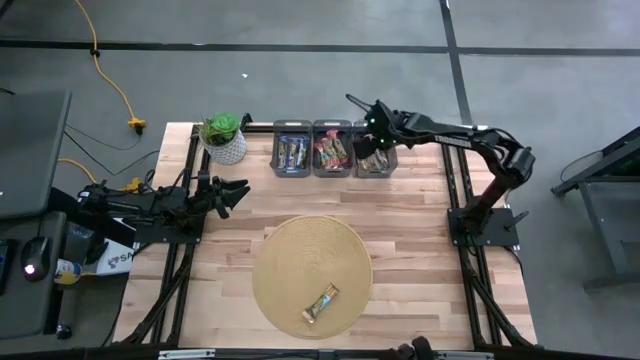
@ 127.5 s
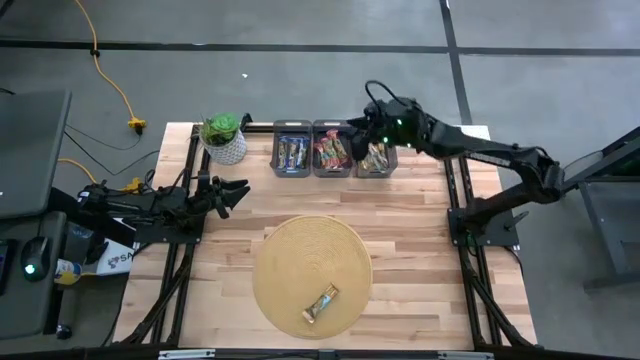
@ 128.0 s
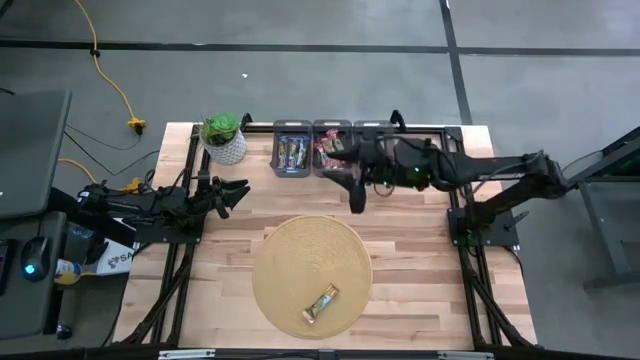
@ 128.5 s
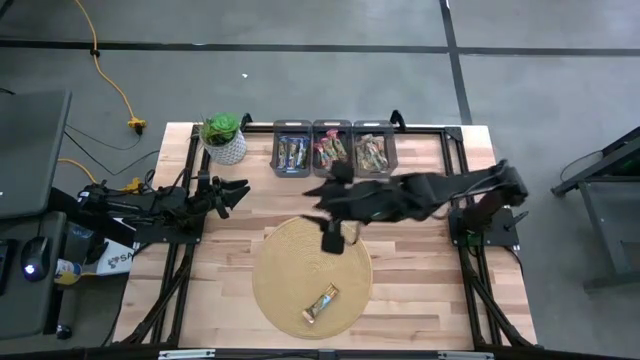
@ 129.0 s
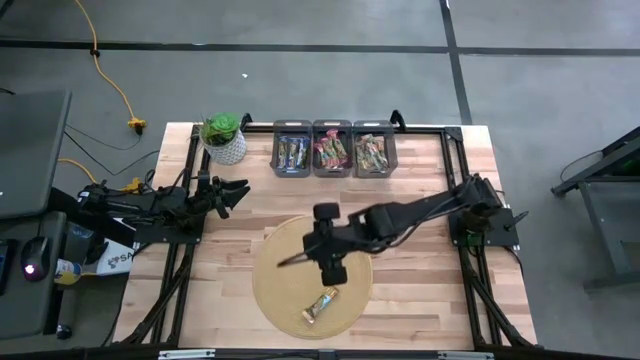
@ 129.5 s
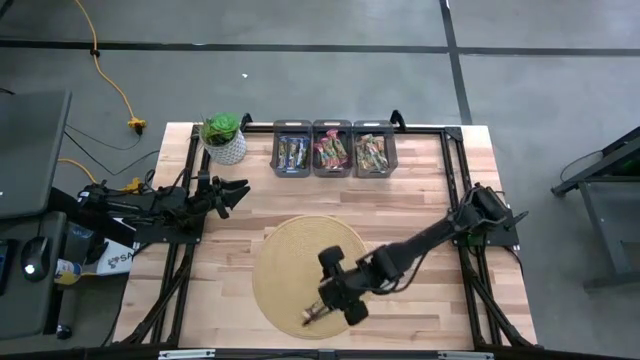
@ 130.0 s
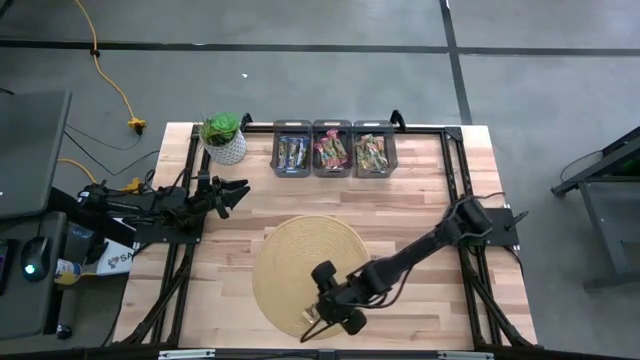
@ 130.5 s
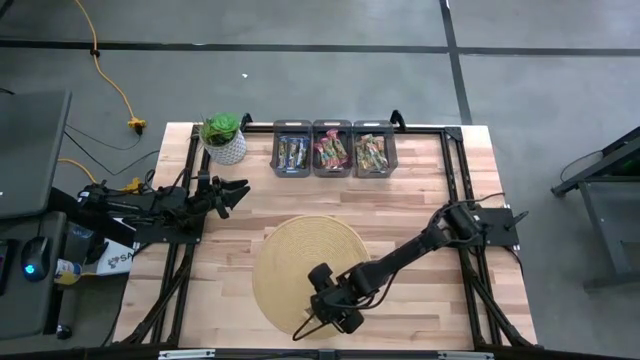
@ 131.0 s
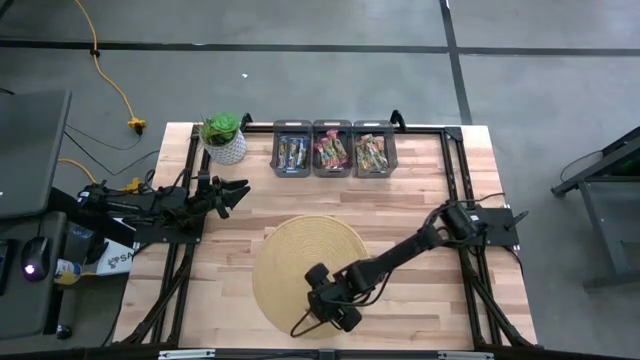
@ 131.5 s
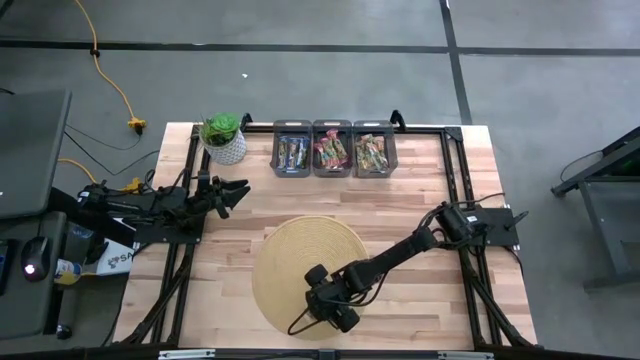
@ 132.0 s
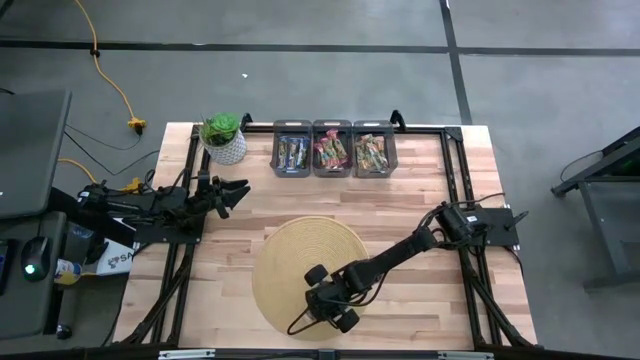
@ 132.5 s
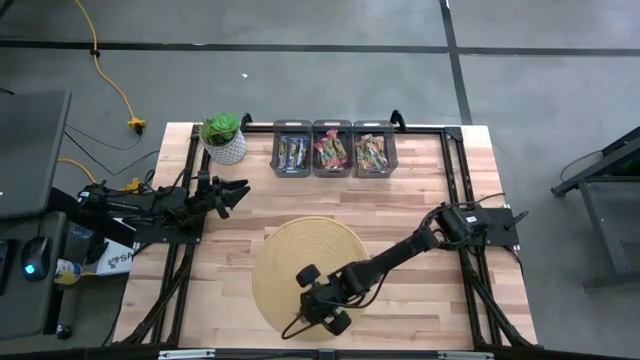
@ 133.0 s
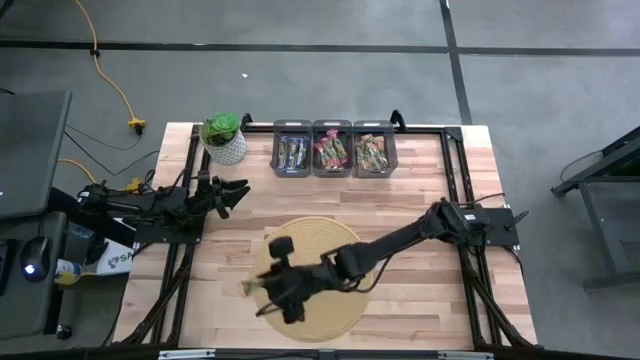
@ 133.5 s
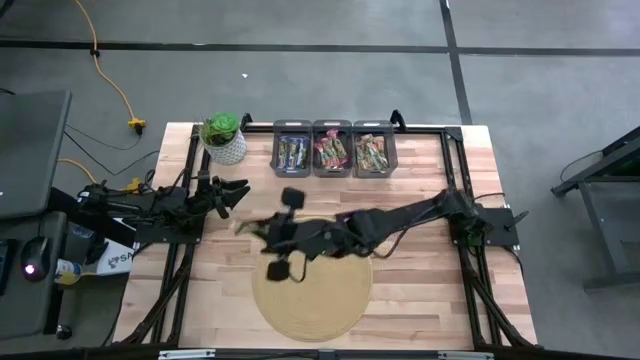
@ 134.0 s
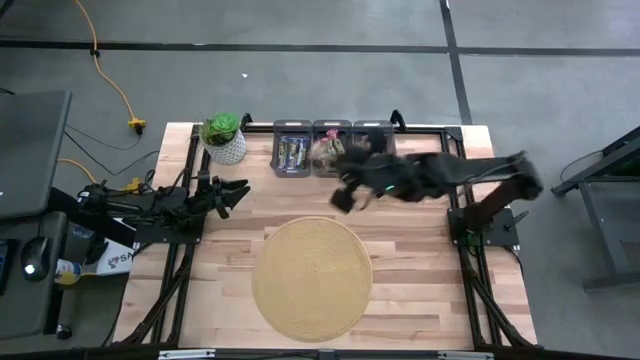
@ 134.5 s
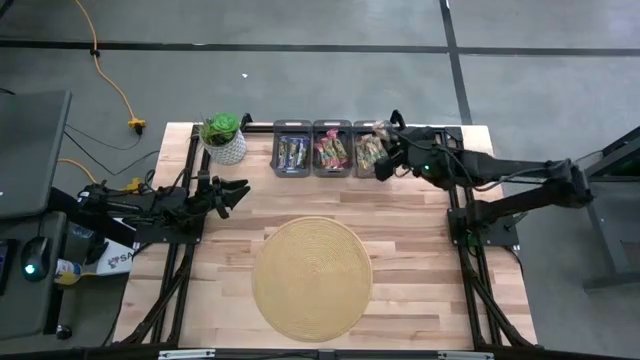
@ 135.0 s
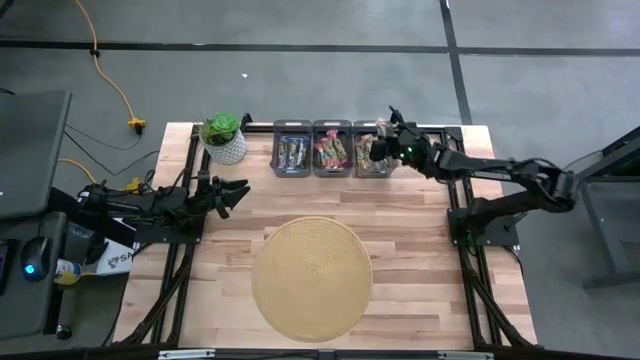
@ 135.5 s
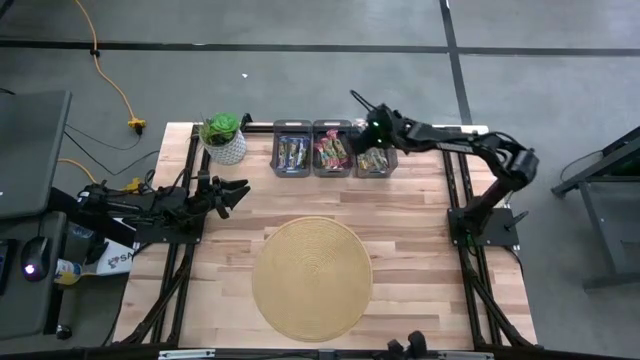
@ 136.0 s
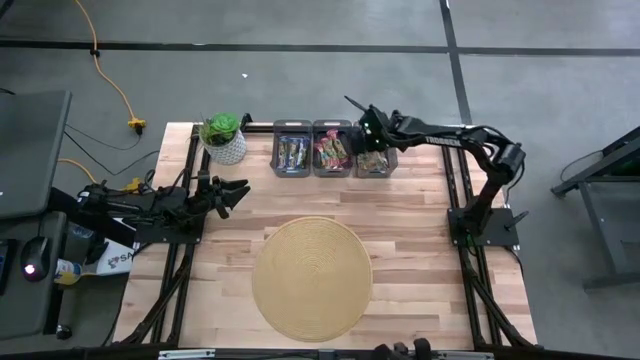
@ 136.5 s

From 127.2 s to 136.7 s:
Task: Pick and place Granola Bars by type
Put the yellow granola bar into the right black bin

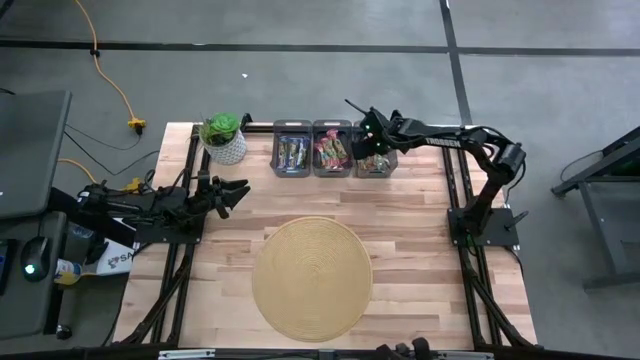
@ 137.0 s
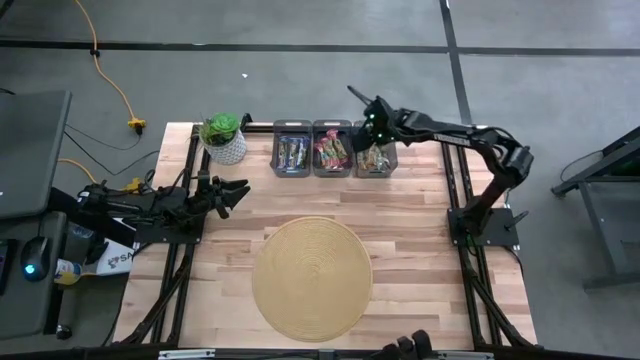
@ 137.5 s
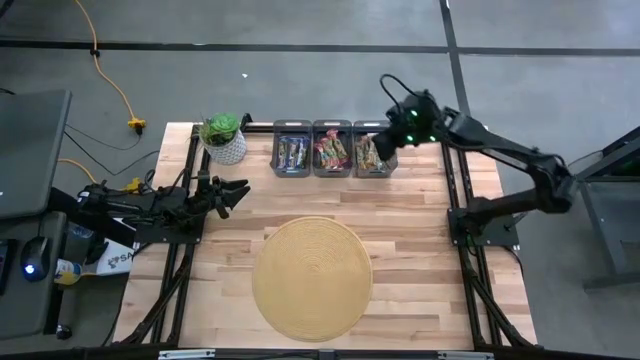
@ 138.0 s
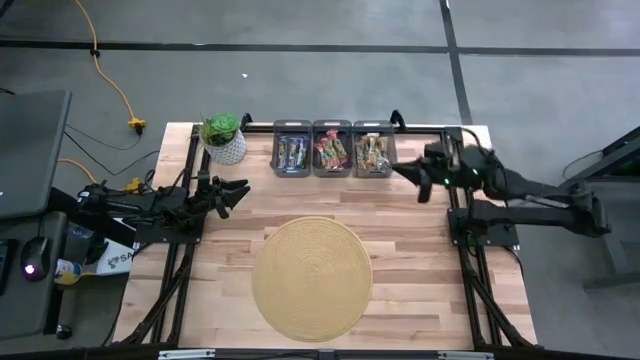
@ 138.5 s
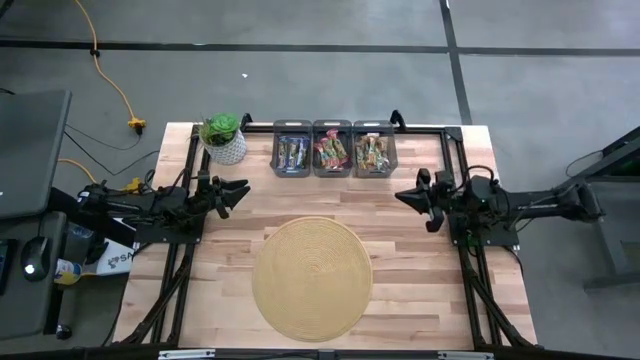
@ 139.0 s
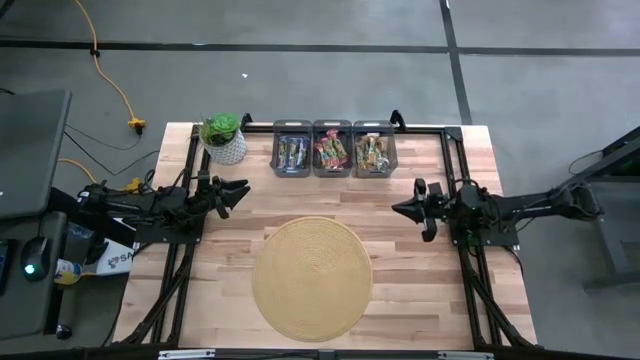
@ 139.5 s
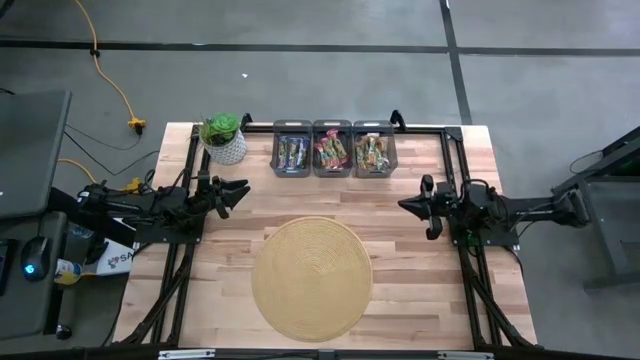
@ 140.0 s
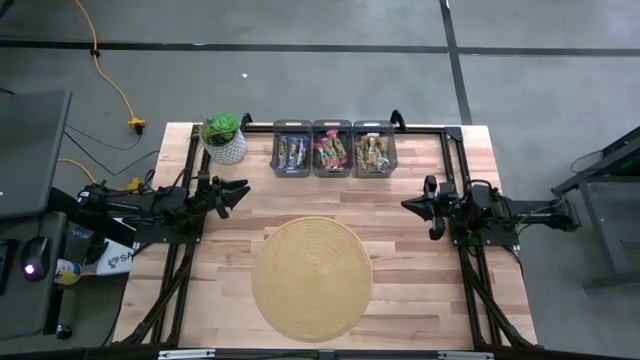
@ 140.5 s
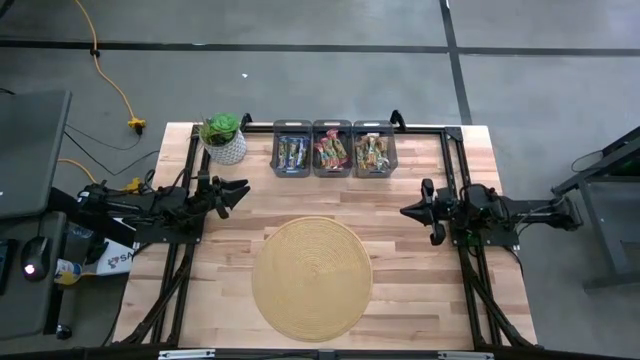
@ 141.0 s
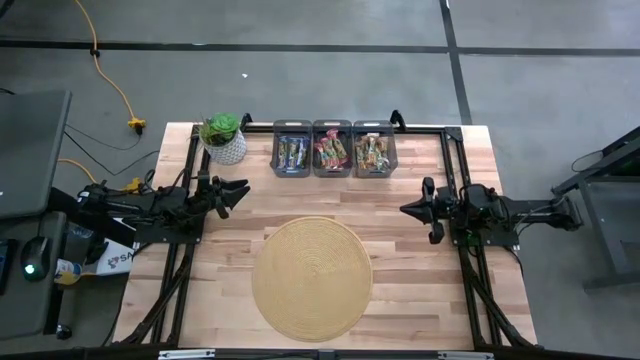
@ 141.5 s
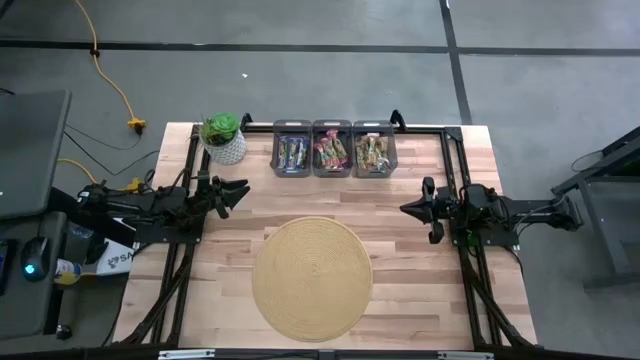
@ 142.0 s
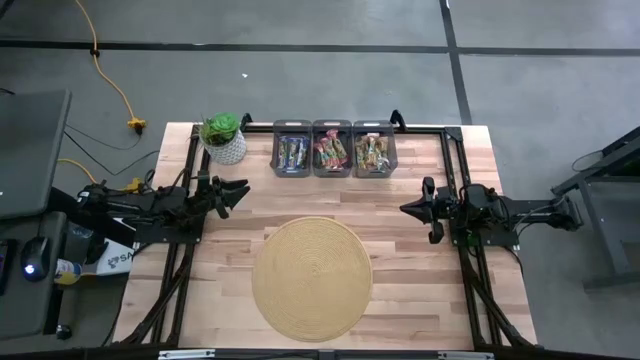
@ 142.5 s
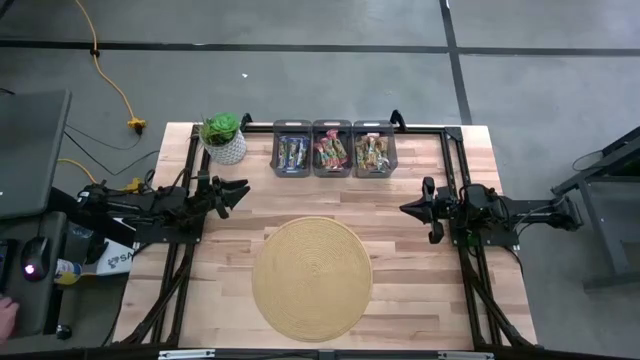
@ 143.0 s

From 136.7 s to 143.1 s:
Return to Home Position

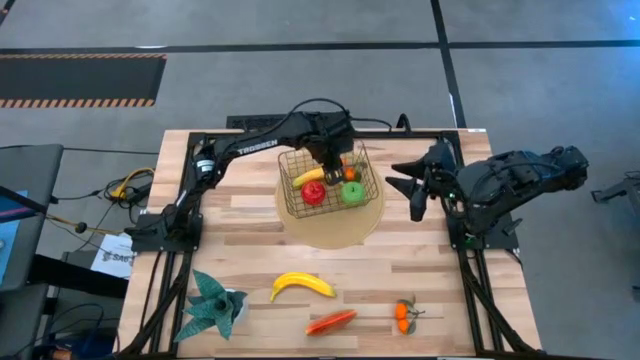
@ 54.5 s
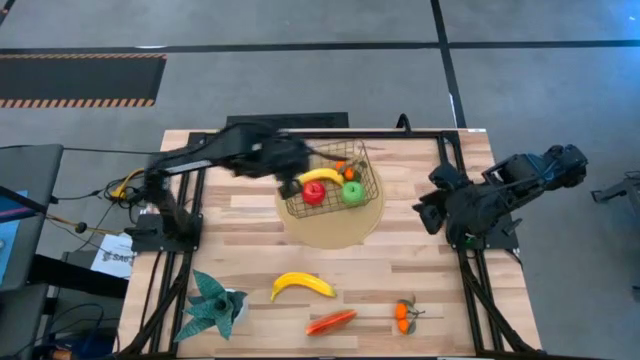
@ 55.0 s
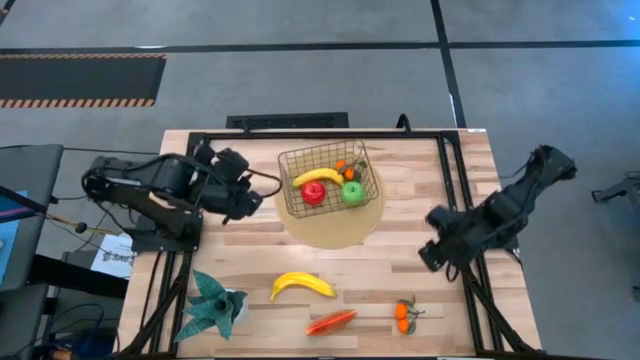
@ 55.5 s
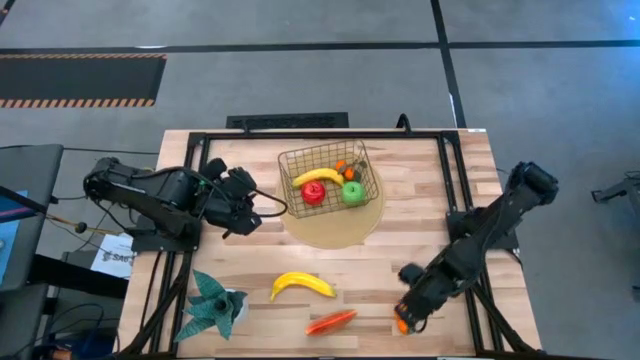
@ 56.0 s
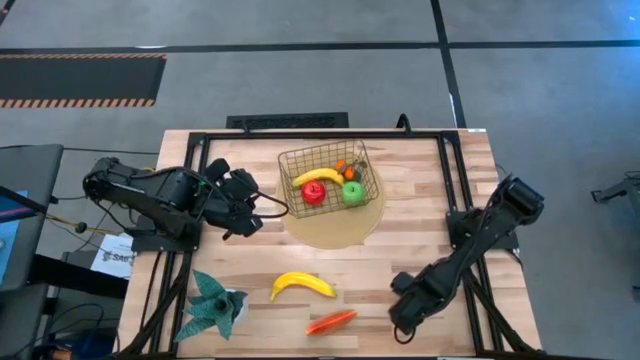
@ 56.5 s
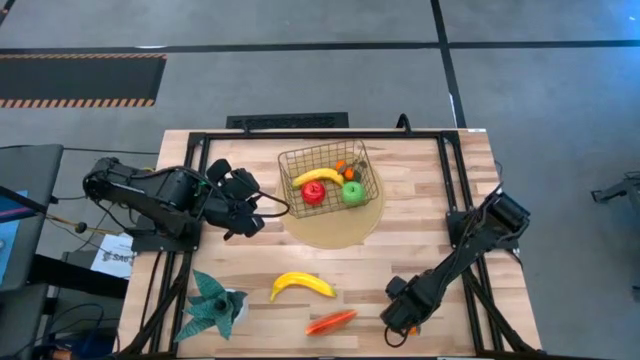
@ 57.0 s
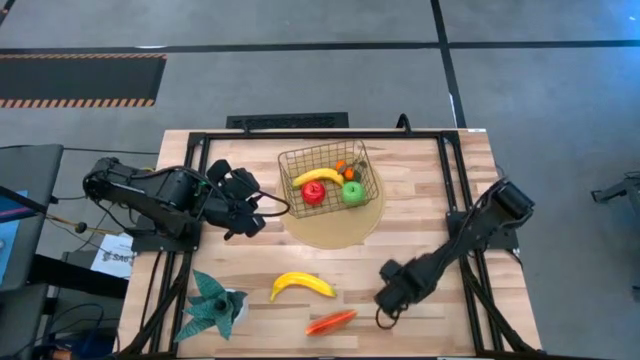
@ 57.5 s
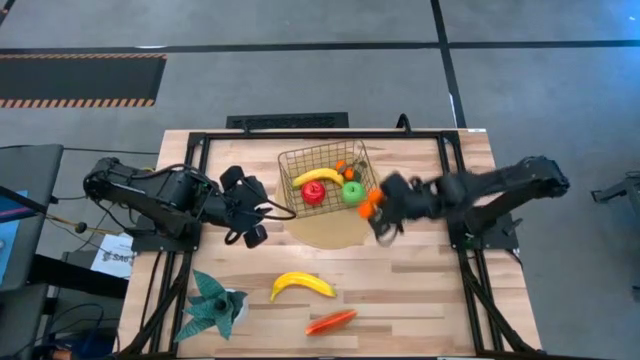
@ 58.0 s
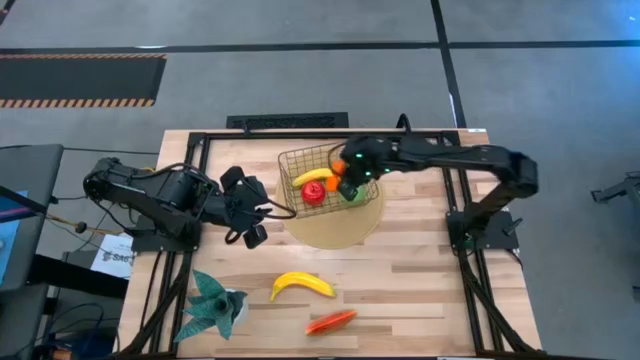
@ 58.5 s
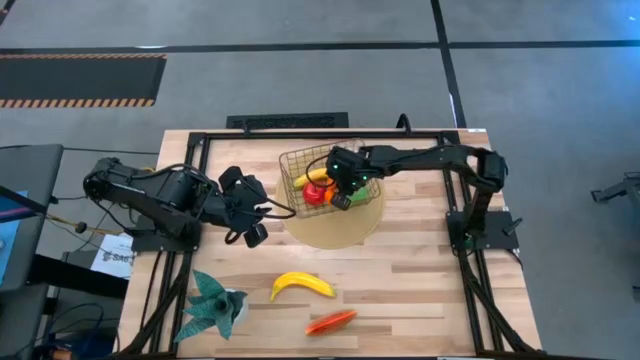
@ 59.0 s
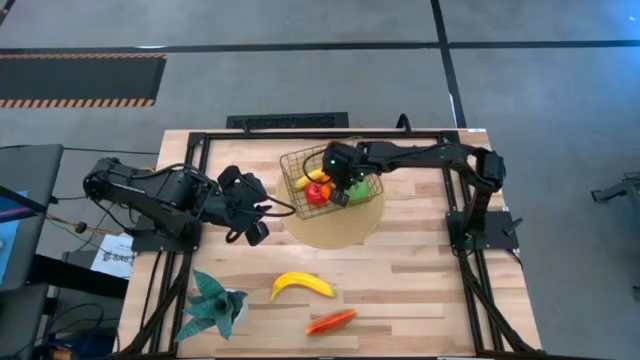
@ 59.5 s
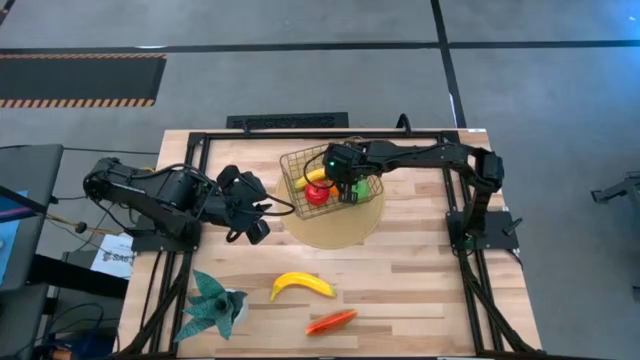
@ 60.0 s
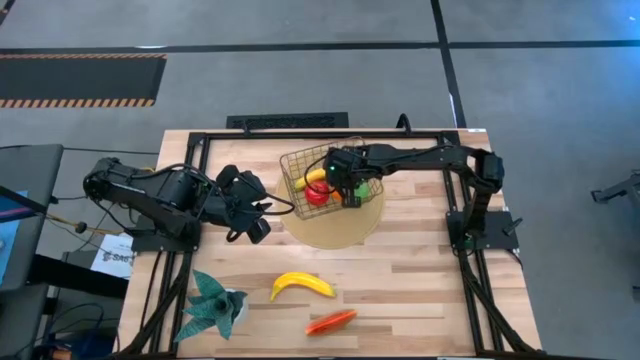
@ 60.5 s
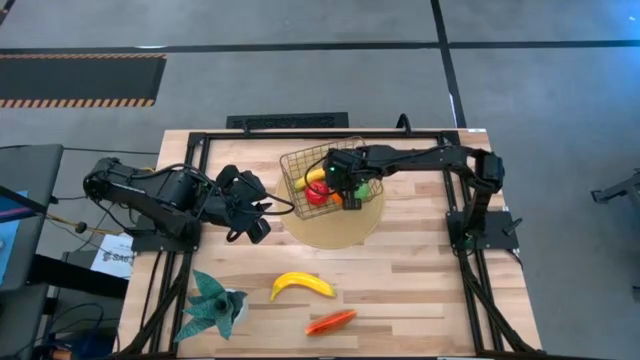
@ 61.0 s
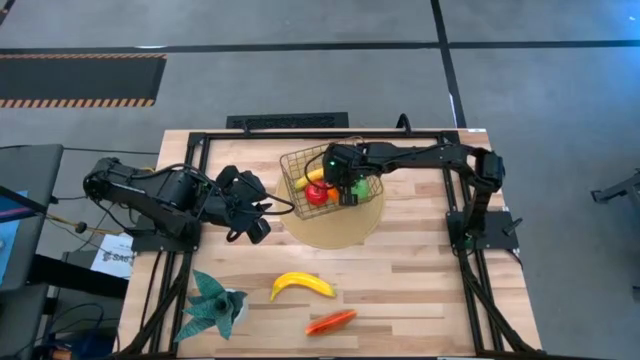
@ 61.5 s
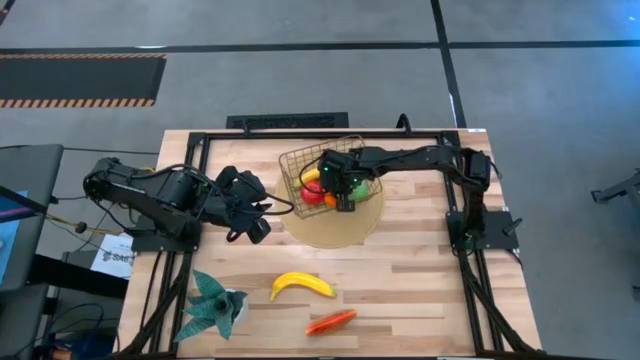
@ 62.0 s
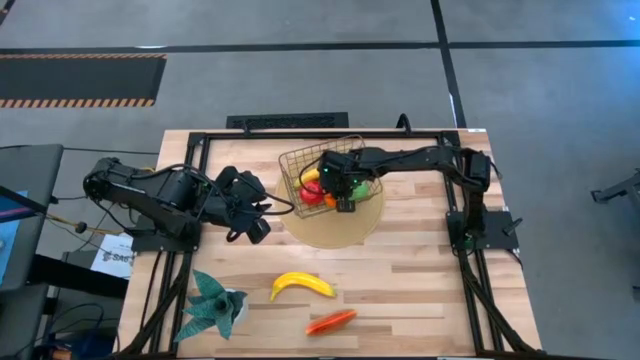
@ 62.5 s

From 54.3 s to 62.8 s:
Task: Build produce basket
Put the oranges into the basket
